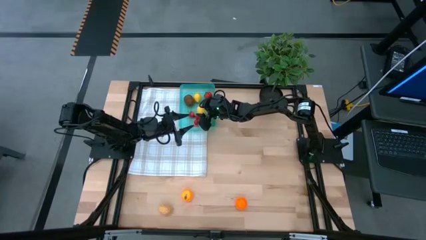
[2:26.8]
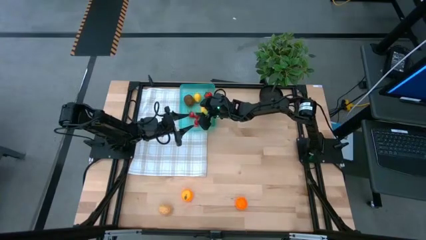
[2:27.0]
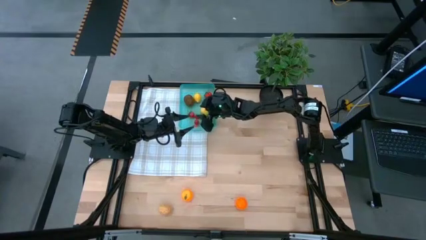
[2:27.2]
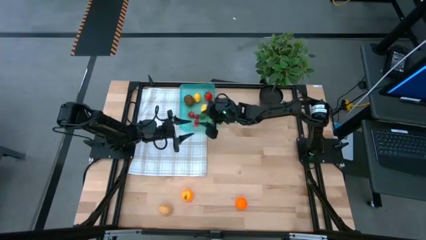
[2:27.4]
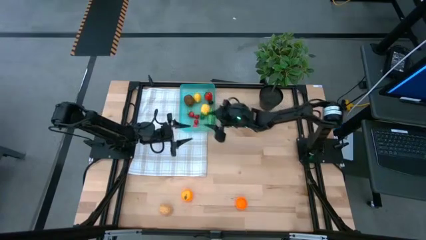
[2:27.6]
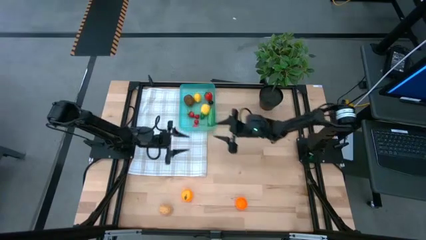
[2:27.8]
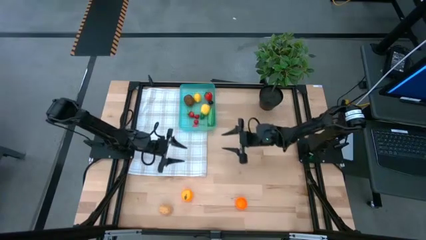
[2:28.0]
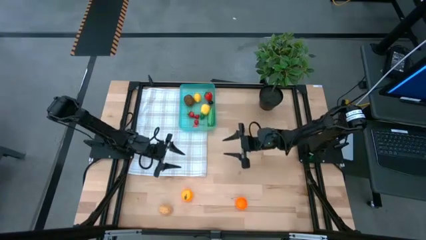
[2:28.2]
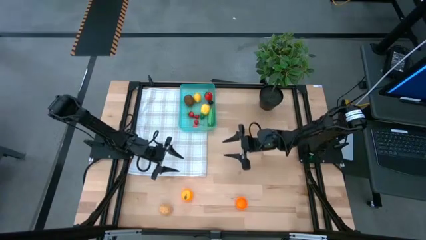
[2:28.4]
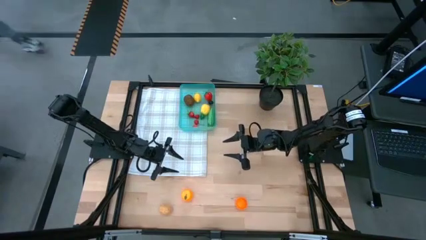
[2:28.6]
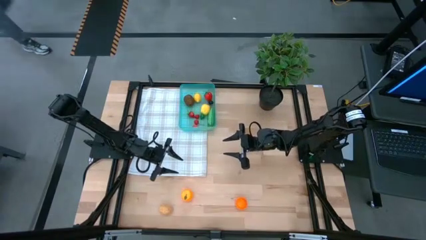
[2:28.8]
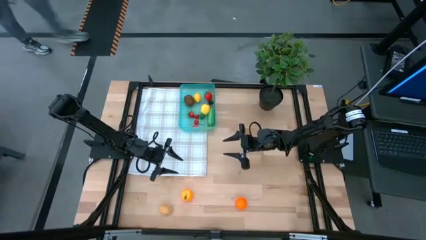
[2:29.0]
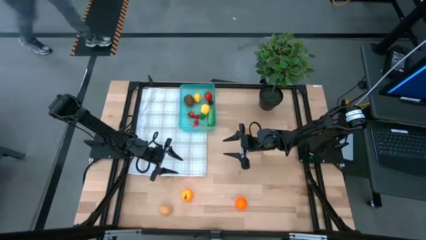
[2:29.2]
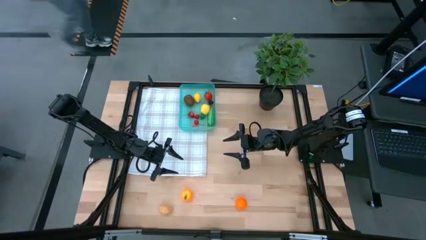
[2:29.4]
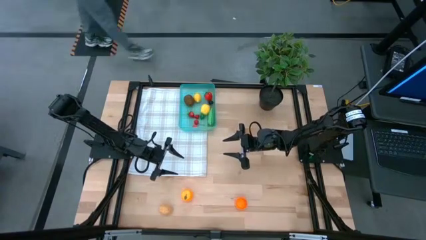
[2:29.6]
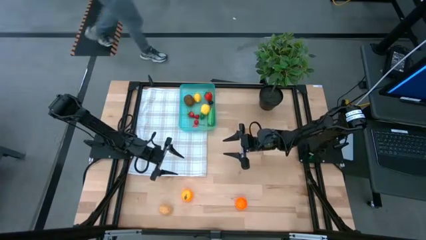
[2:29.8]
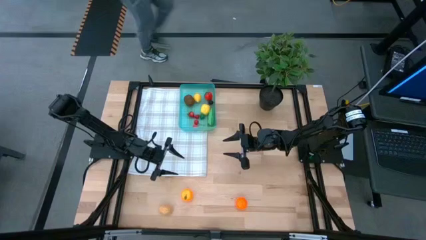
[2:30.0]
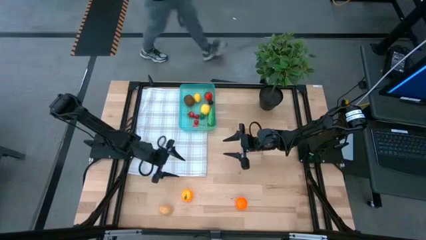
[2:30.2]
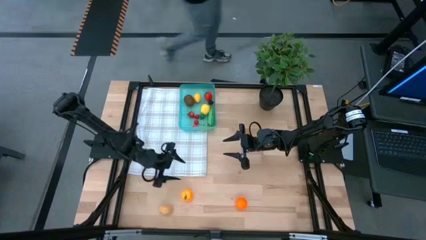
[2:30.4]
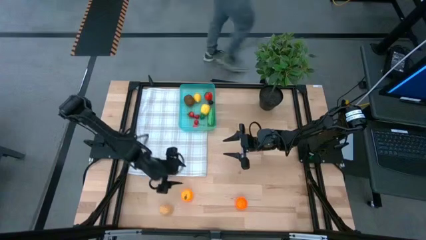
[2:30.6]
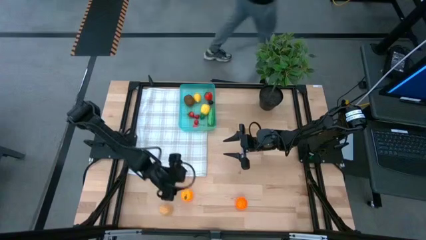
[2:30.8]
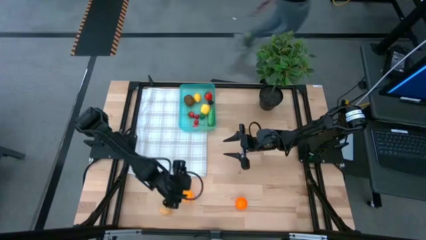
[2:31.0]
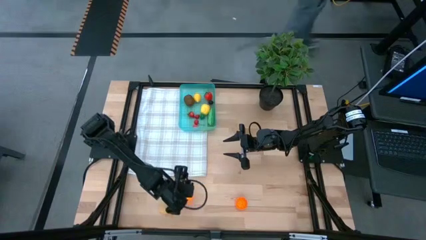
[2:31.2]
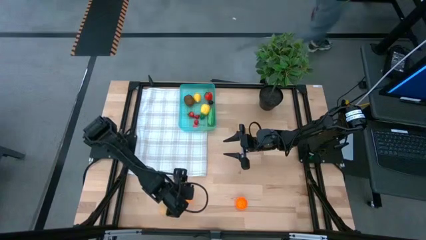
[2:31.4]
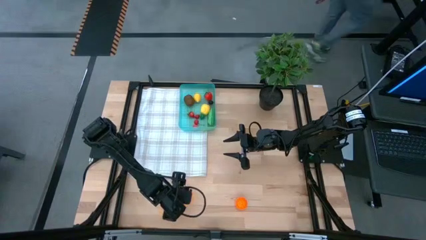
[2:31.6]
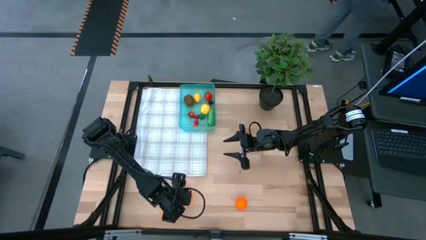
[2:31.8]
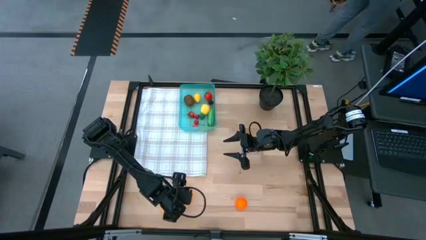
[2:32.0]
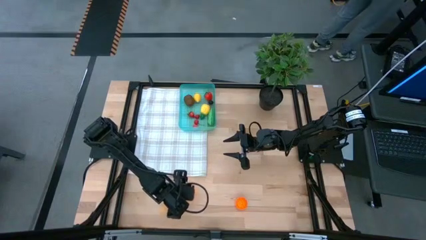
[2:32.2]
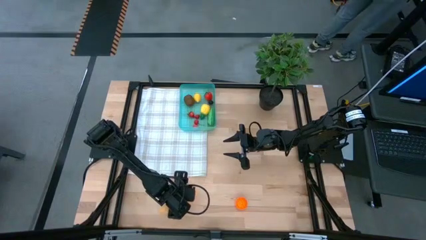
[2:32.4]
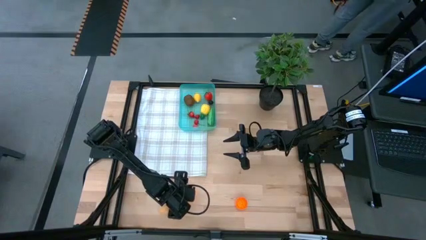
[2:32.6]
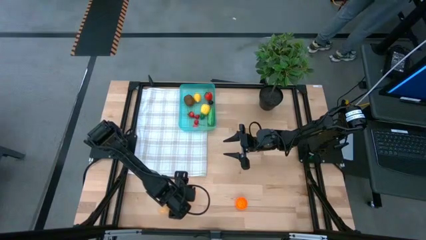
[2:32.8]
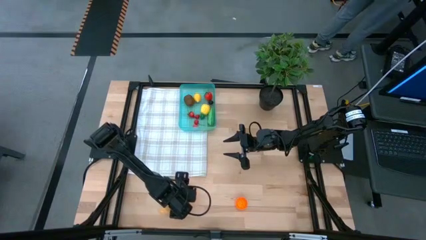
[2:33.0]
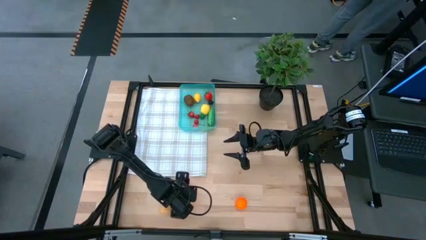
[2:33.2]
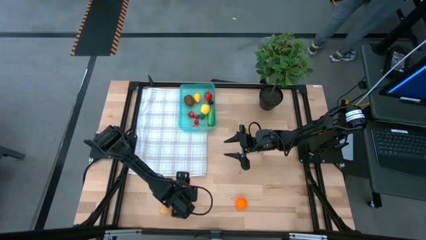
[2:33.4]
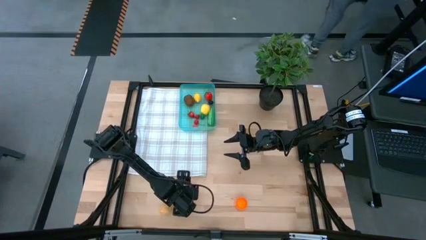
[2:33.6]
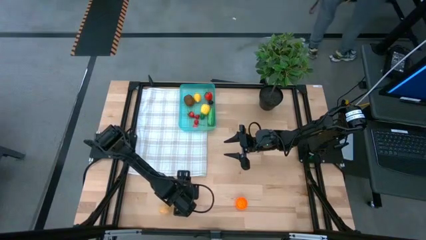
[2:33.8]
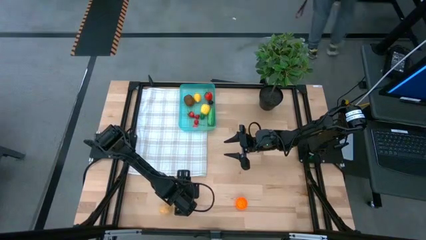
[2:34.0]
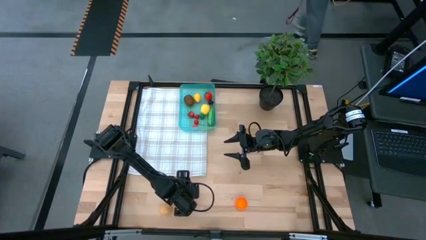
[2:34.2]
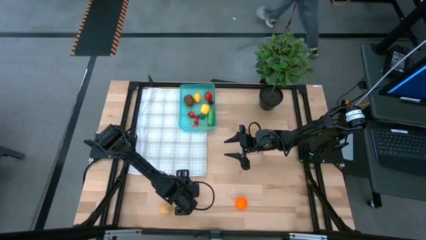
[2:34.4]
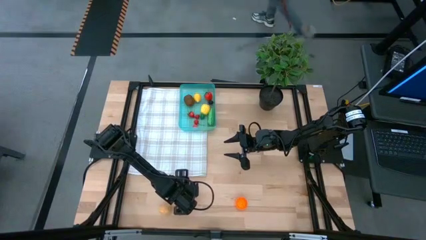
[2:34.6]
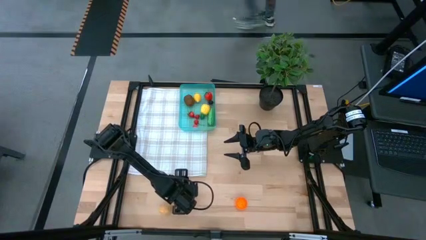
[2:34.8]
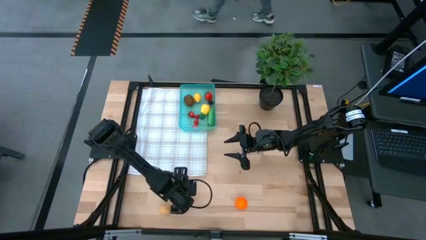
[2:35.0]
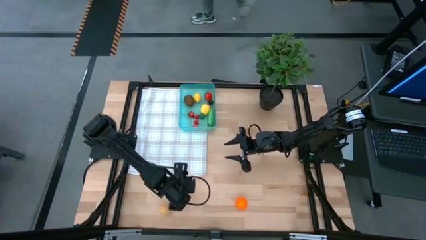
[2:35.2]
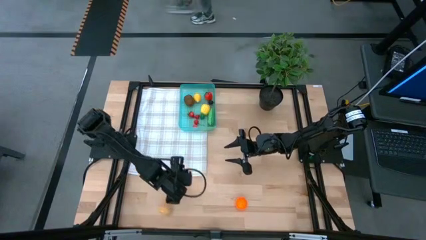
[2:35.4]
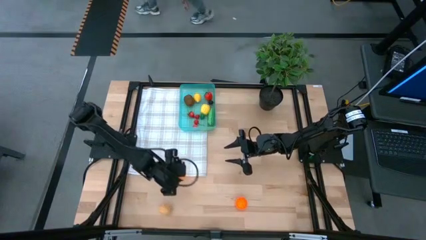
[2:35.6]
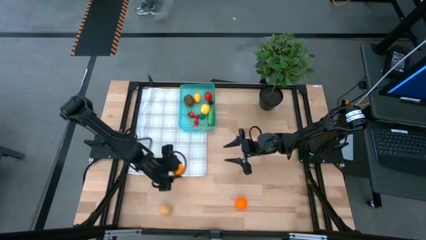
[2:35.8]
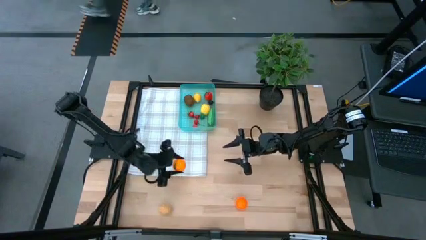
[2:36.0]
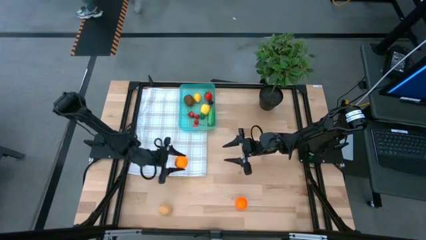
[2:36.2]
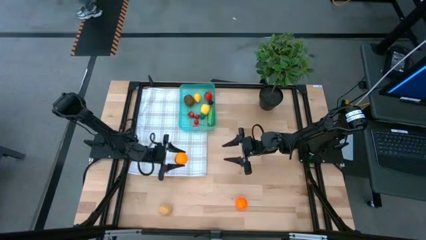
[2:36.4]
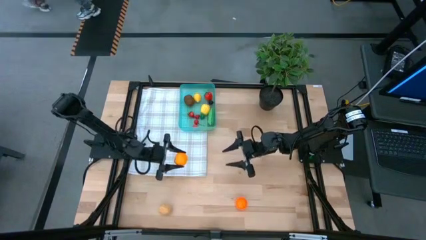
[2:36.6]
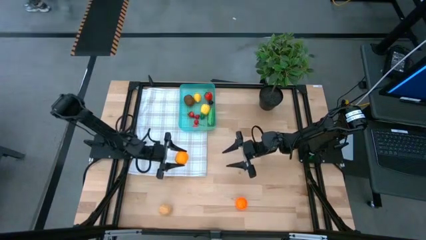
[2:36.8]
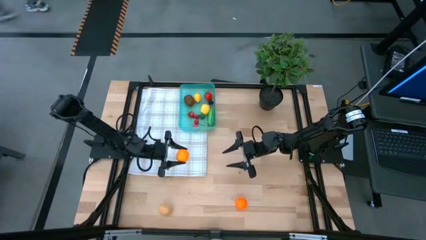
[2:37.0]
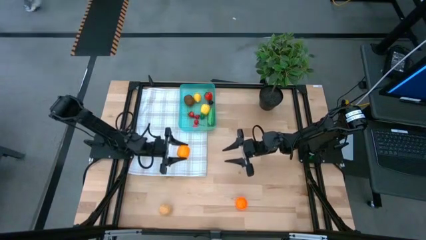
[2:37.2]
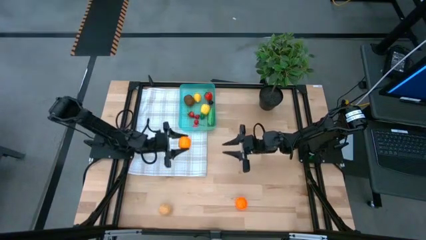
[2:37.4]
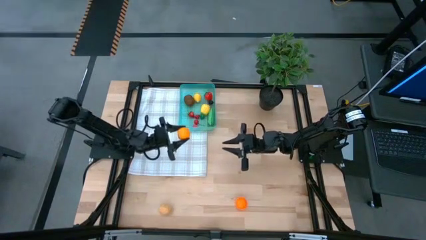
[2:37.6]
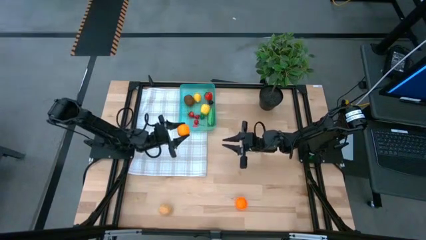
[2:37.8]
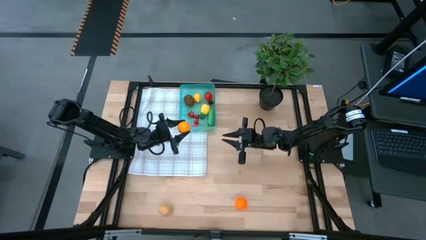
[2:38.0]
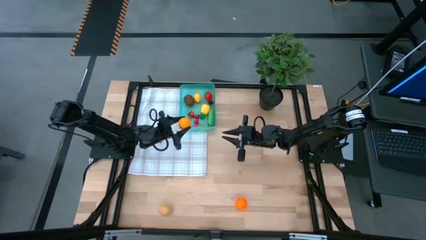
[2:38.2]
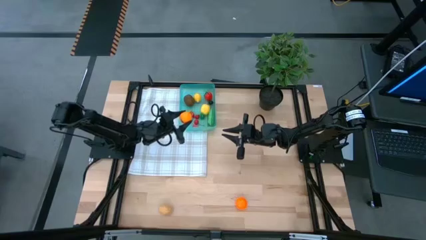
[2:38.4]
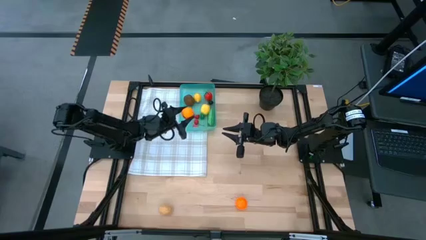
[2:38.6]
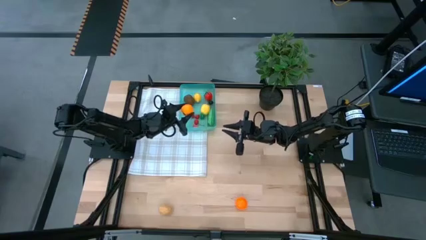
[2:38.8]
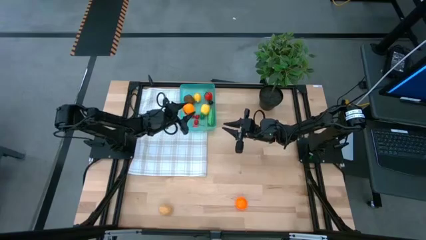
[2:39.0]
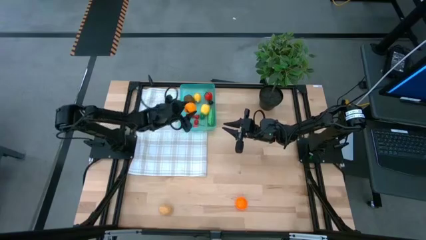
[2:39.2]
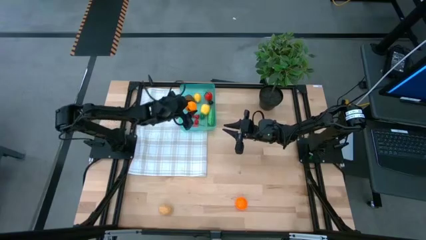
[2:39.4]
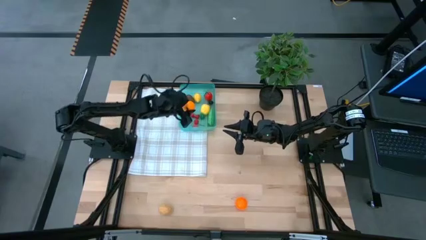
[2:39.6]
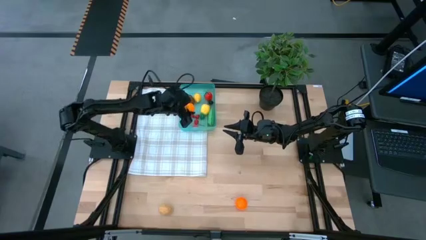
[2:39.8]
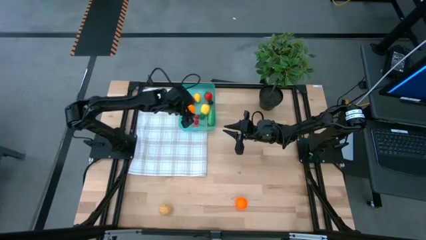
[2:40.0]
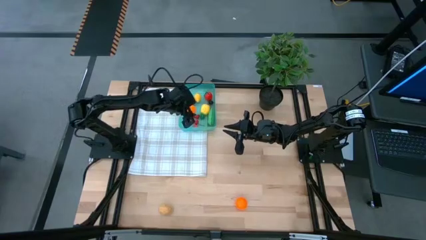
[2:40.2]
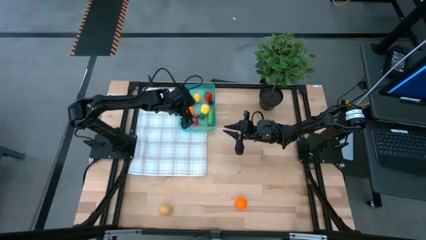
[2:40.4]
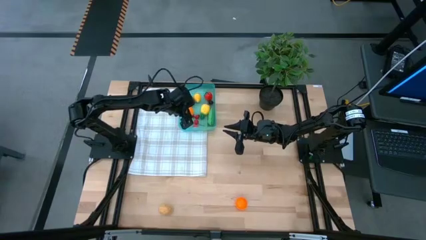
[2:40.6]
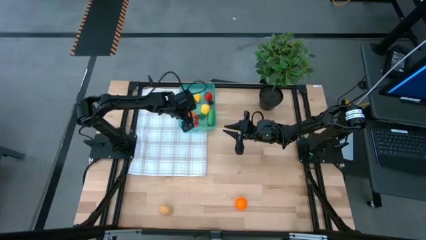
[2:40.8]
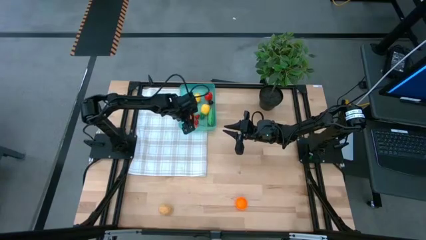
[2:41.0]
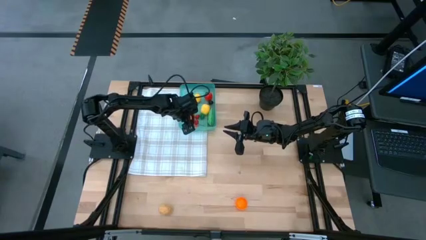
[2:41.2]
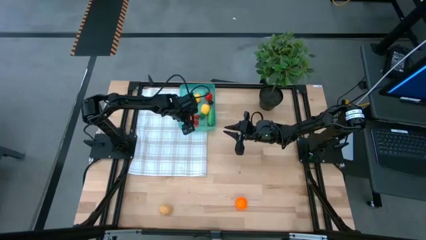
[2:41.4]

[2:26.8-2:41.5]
Task: Pick and placing Produce into tupperware
Put the orange into the blue bin

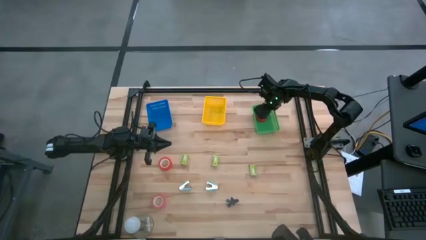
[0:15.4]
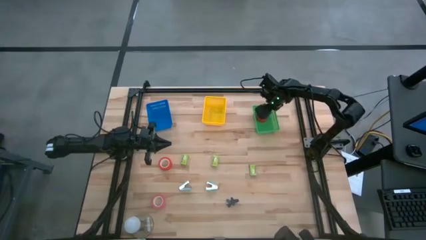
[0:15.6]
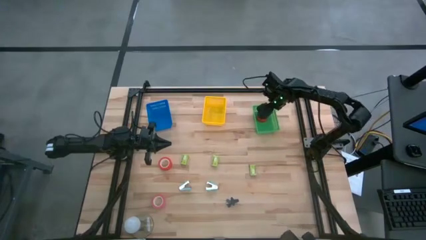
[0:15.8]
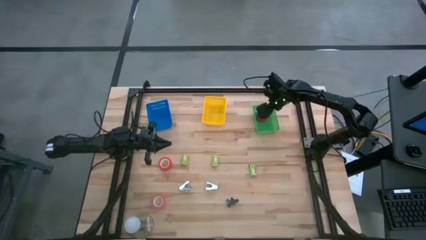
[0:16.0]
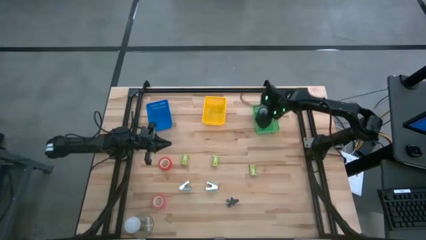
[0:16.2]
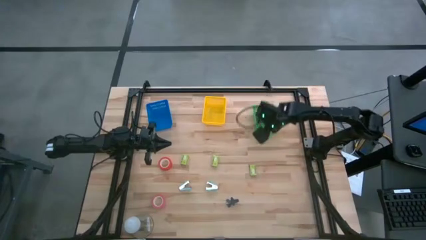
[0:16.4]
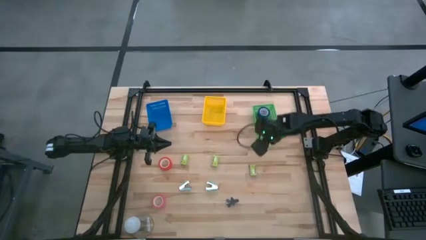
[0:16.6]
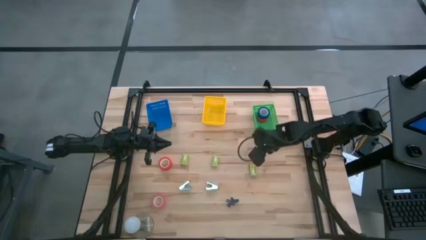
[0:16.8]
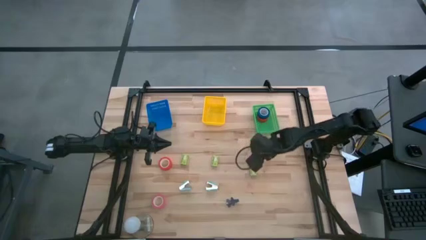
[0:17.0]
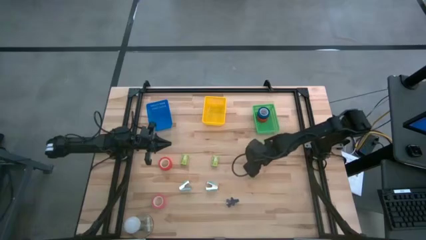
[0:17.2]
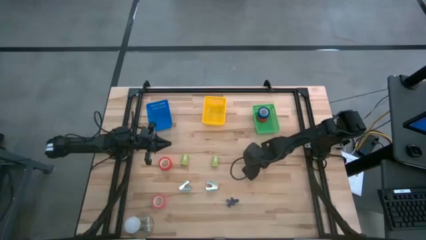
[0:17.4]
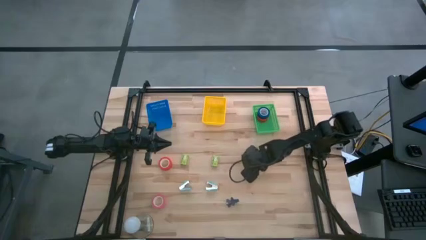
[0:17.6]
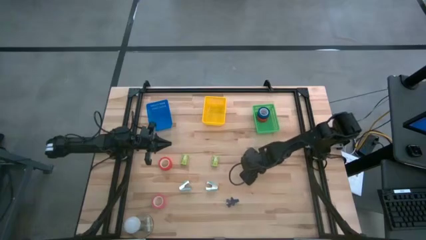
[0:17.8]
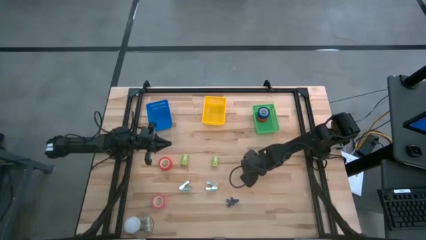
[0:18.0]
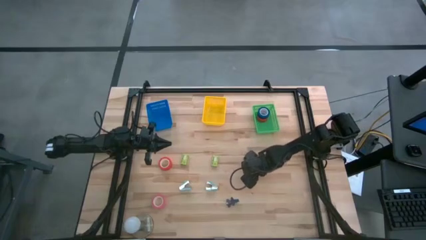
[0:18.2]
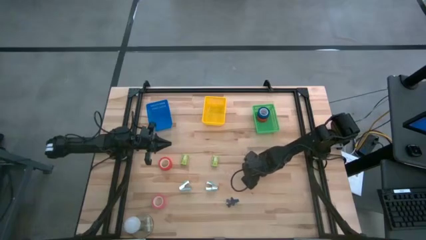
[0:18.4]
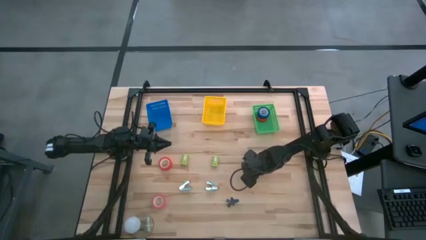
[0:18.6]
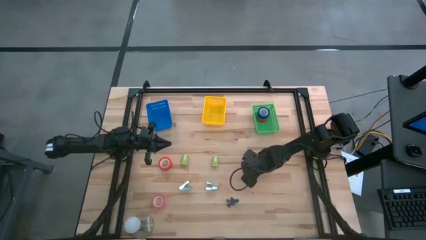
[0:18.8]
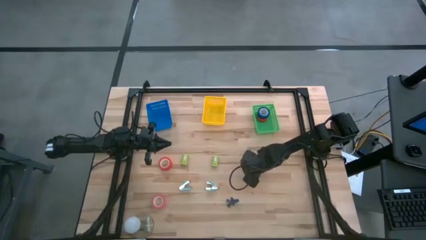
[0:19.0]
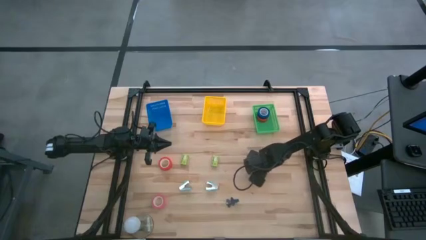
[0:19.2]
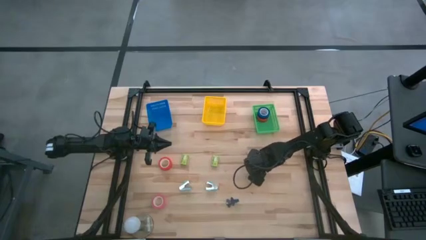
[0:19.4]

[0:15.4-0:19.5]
Task: Pick and place Stapler, Stapler remover, tape
Put the right staple box into the yellow bin
